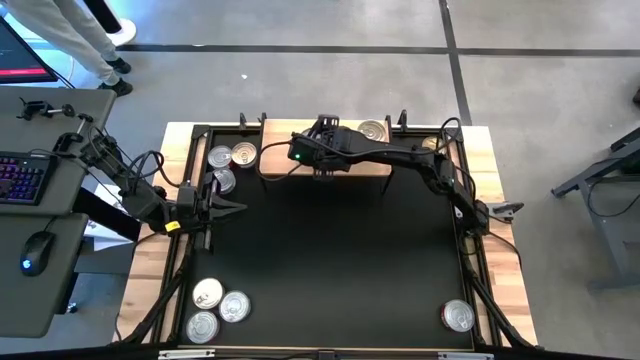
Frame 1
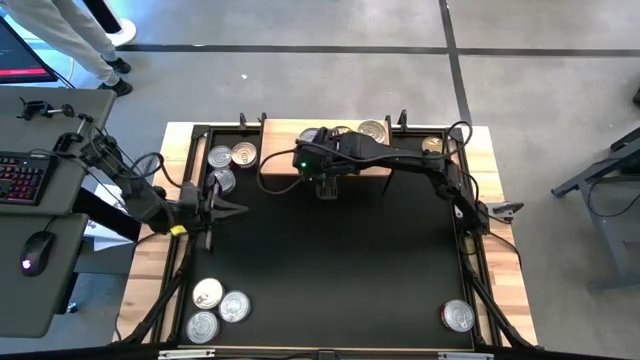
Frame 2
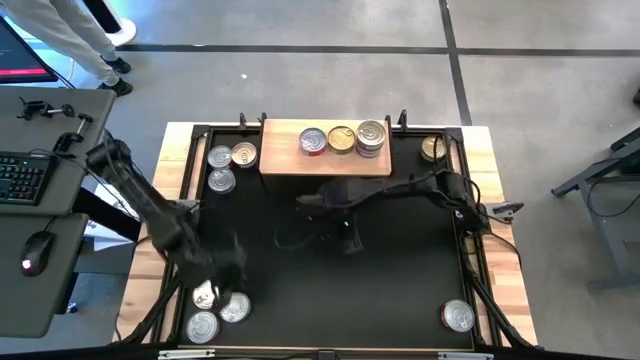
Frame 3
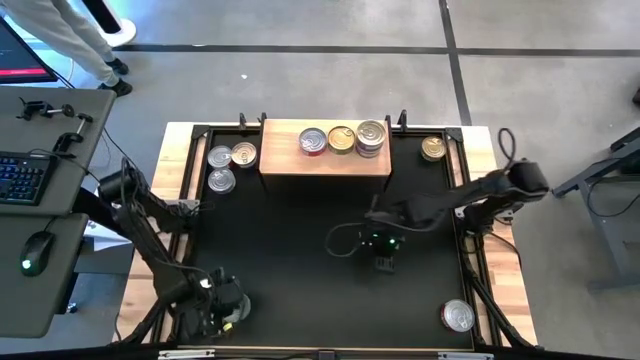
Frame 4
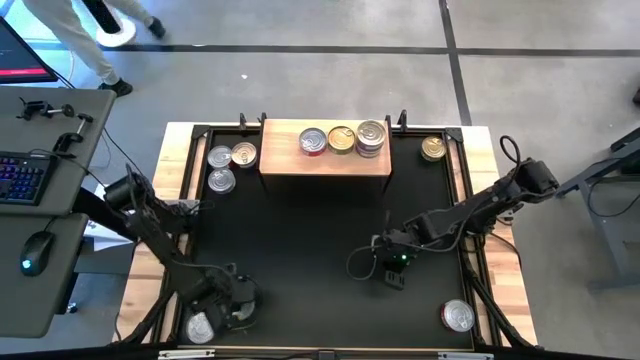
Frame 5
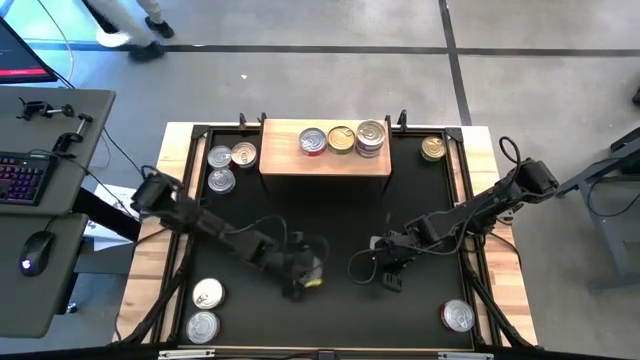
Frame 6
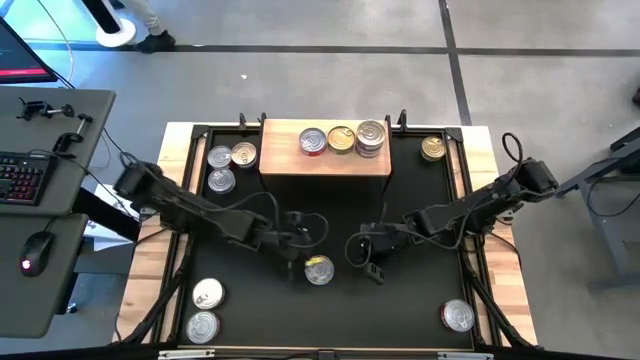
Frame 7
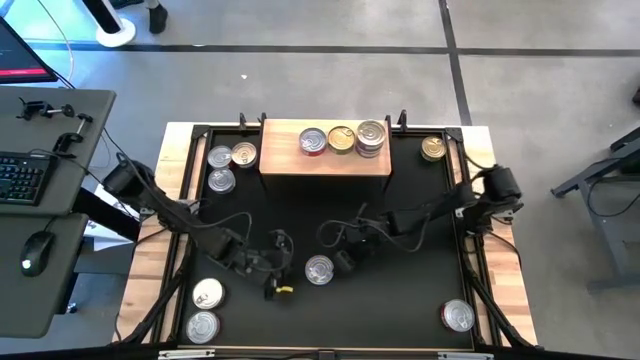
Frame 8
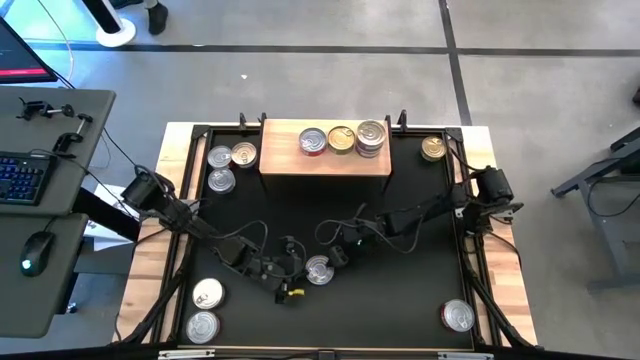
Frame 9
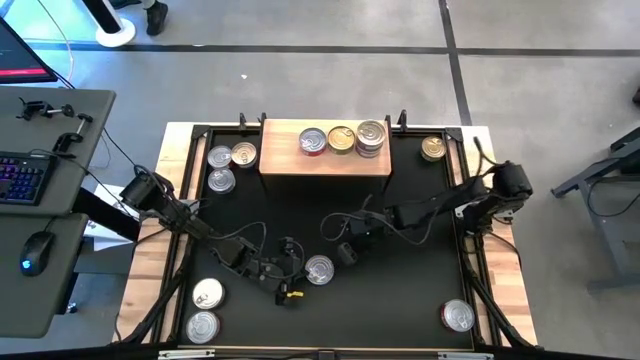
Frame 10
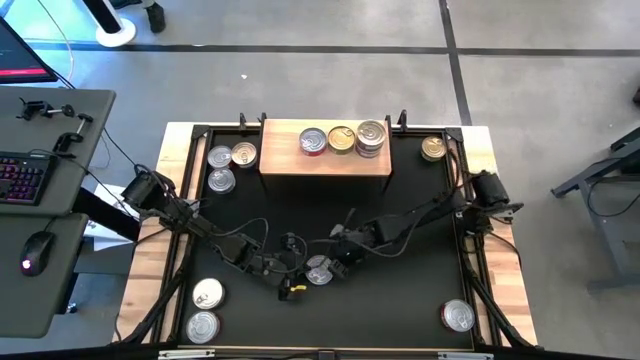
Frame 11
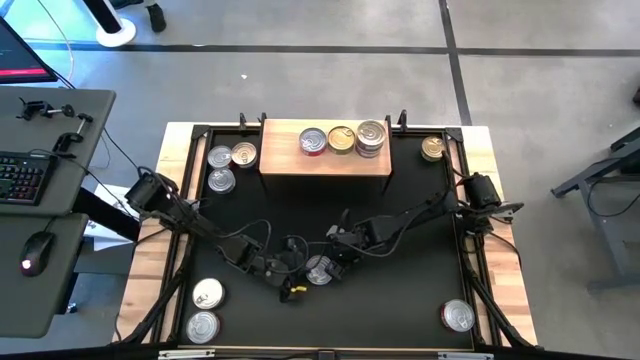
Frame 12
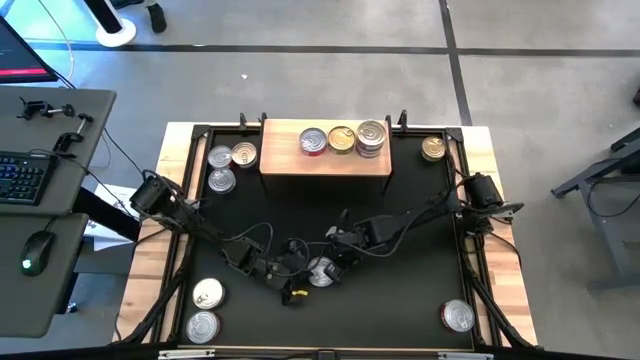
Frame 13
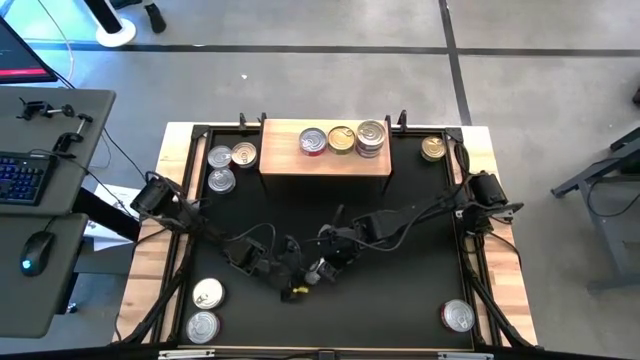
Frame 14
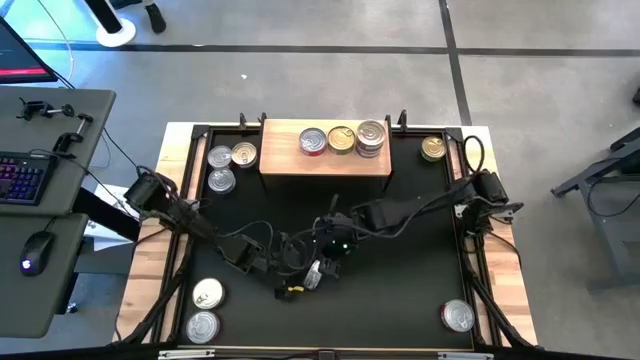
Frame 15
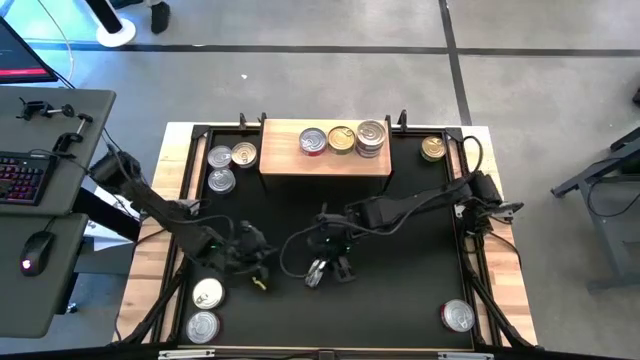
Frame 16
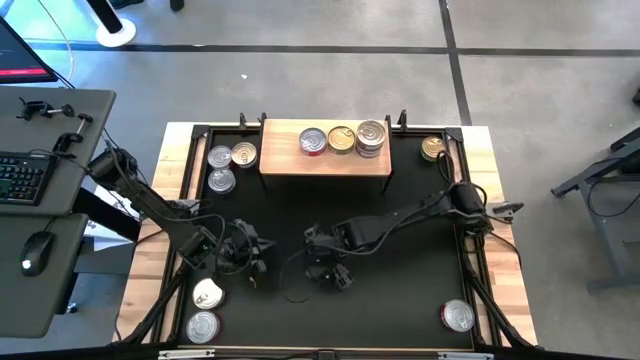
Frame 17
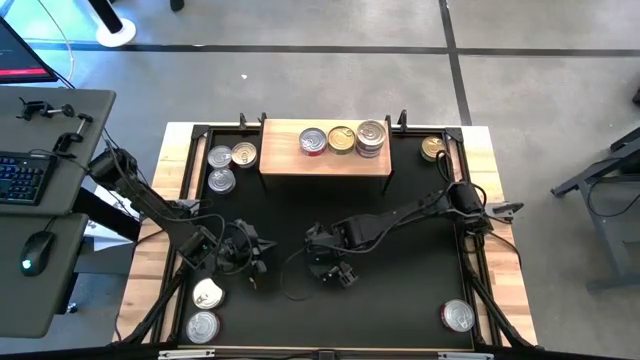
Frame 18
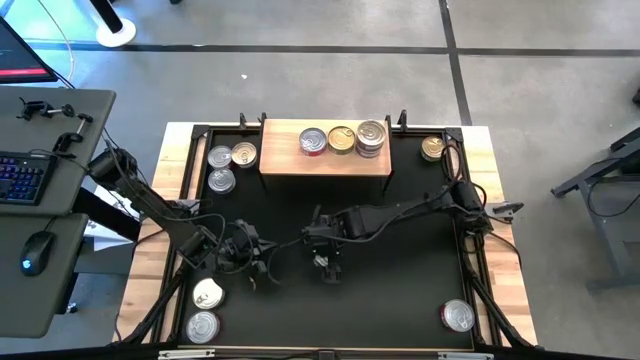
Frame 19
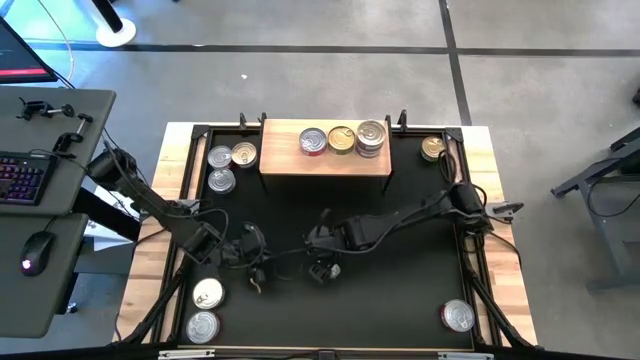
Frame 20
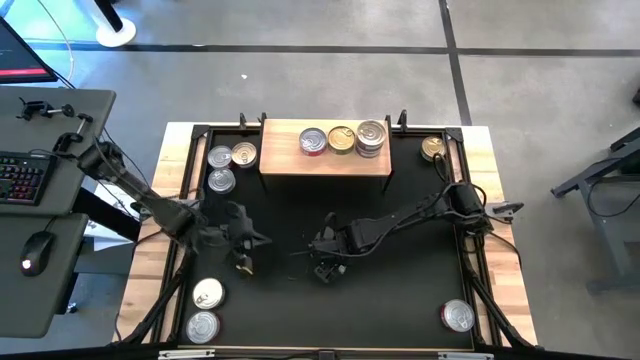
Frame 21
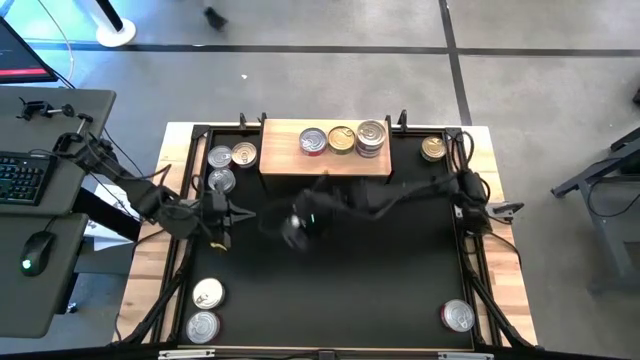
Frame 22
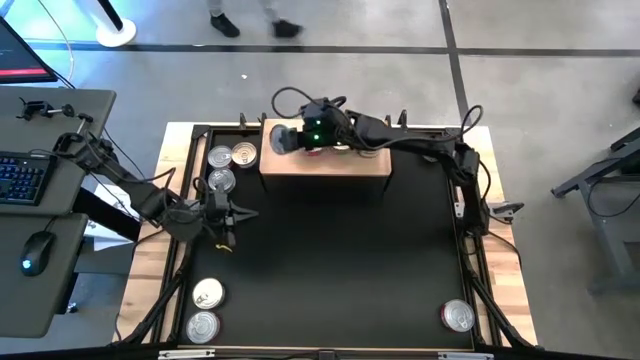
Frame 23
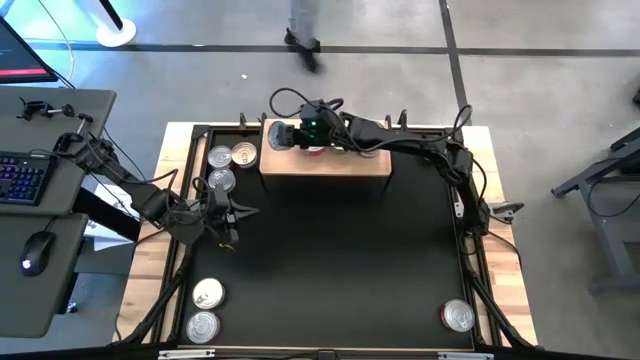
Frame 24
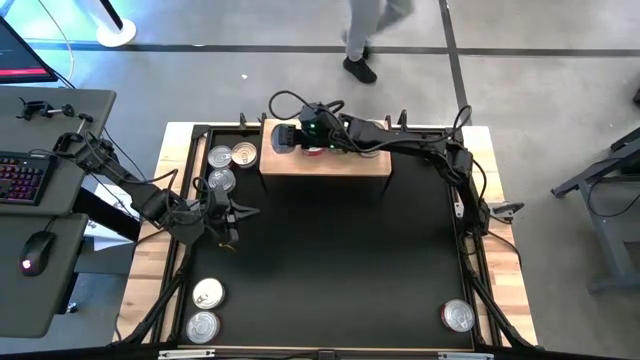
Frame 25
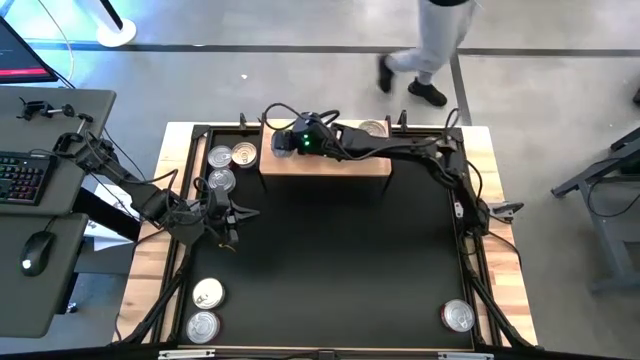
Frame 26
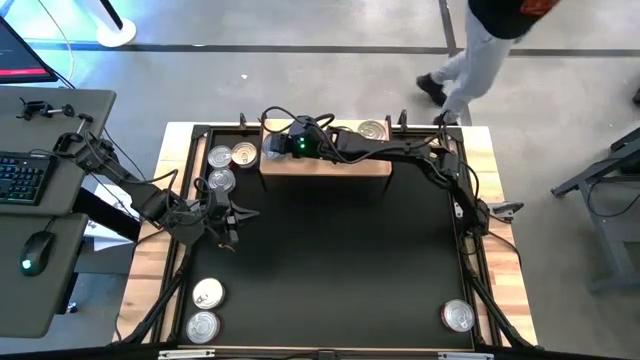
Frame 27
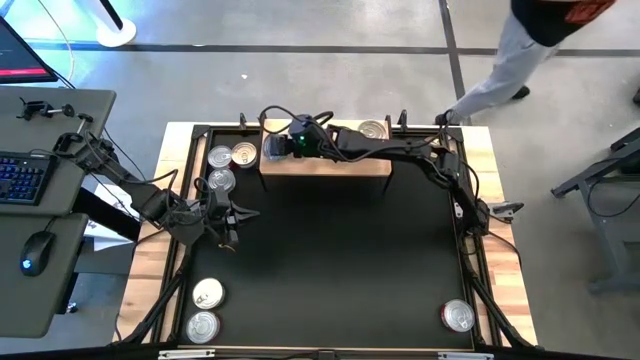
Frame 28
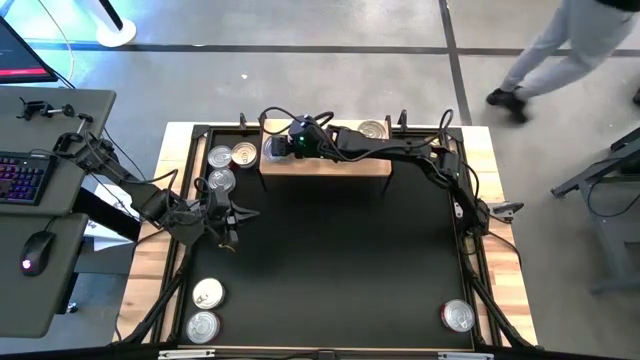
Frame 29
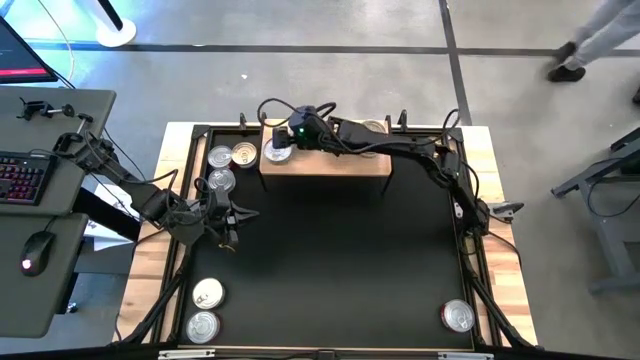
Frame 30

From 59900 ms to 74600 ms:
Task: Stack canned seafood by type on shelf
Put the bottom light green tuna can on the shelf

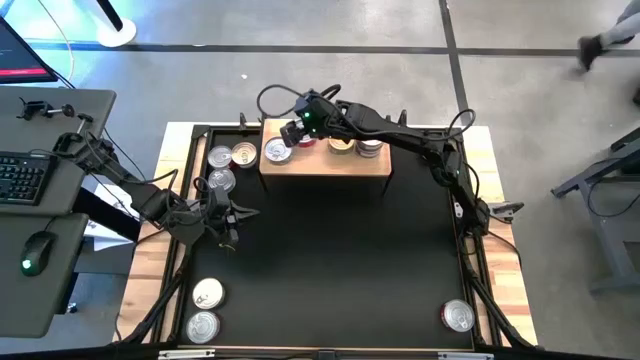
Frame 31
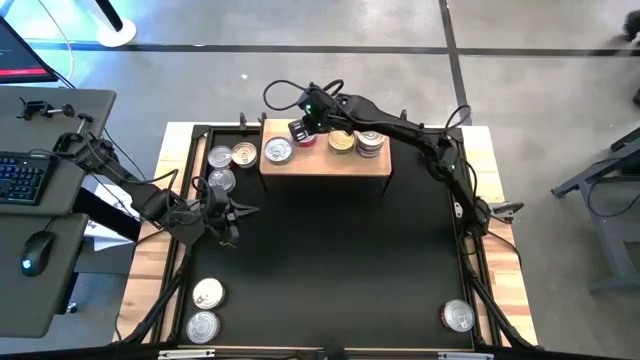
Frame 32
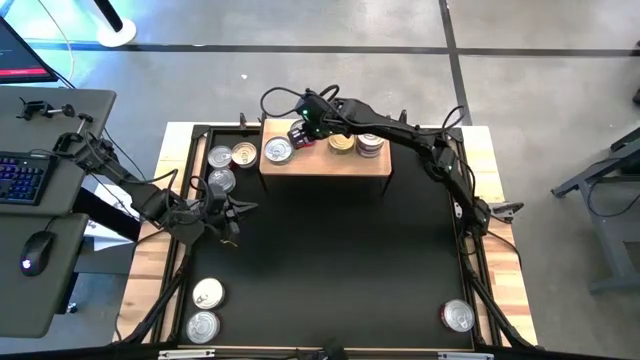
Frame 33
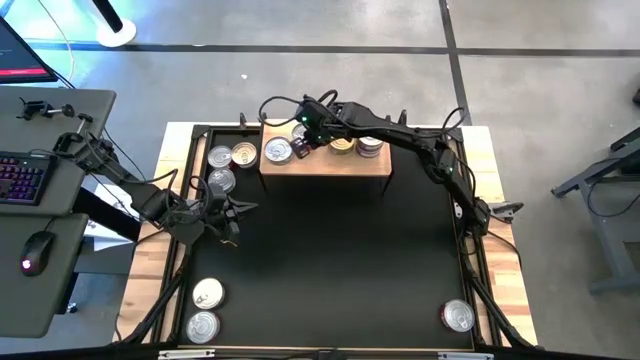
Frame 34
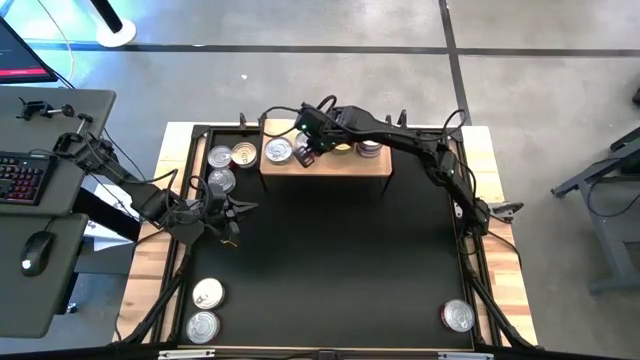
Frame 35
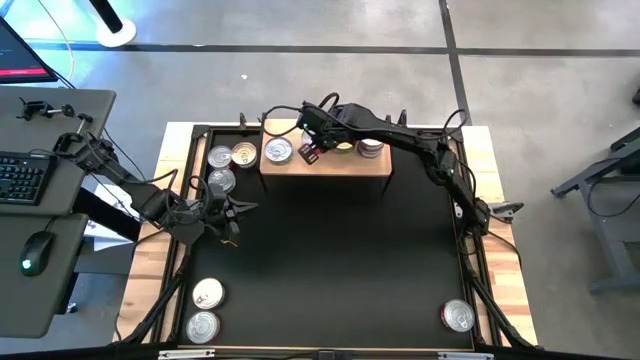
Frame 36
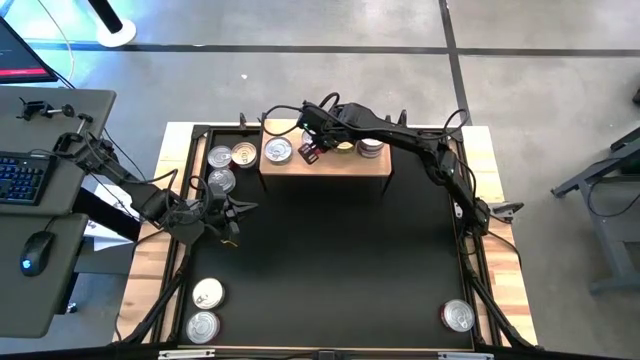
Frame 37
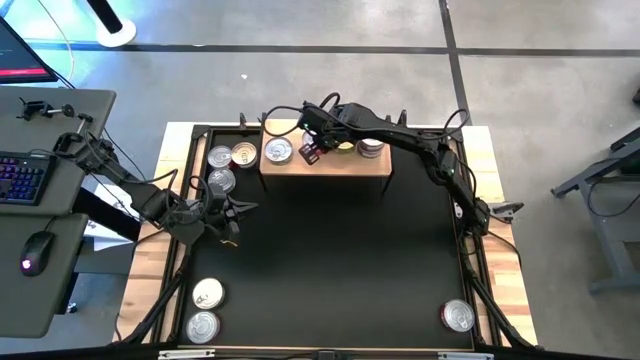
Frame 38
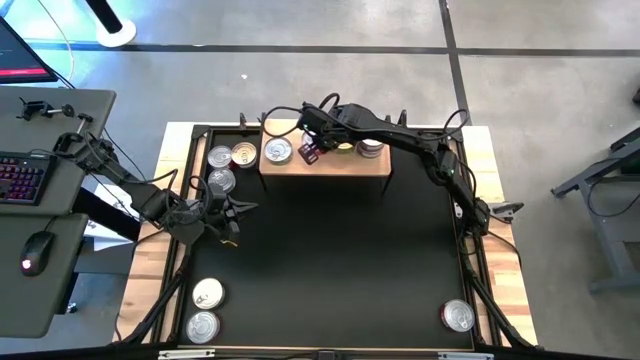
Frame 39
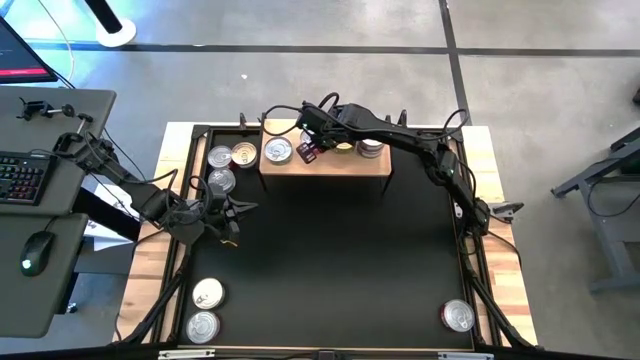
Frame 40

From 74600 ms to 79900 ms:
Adjust the red tuna can

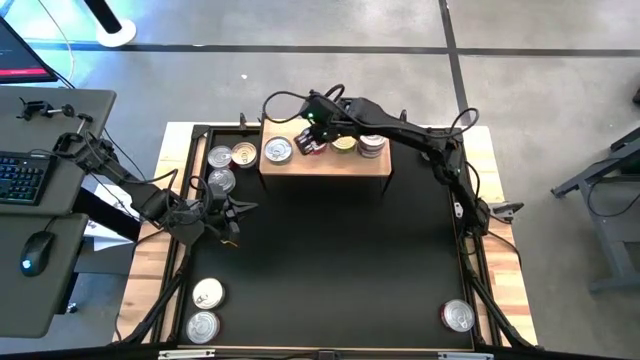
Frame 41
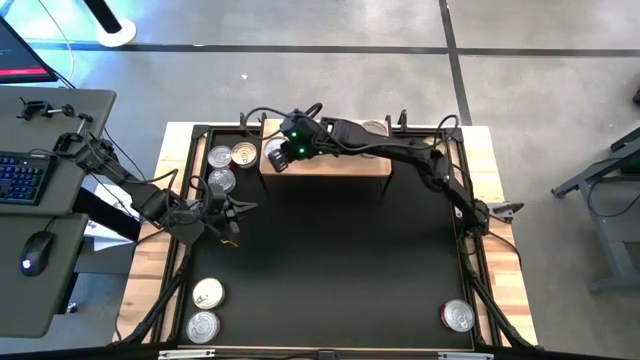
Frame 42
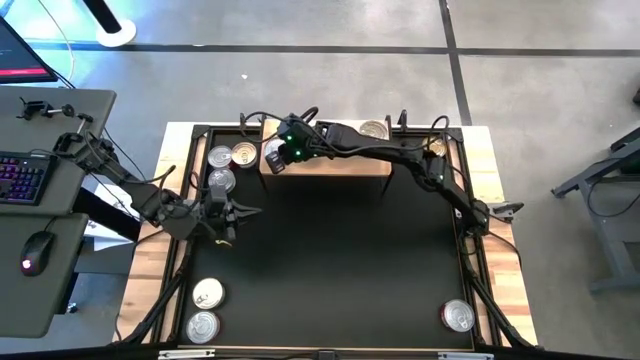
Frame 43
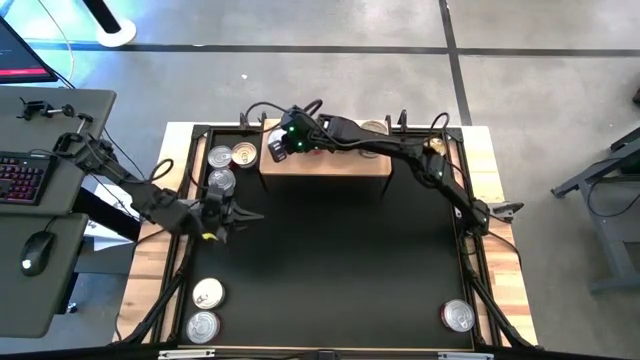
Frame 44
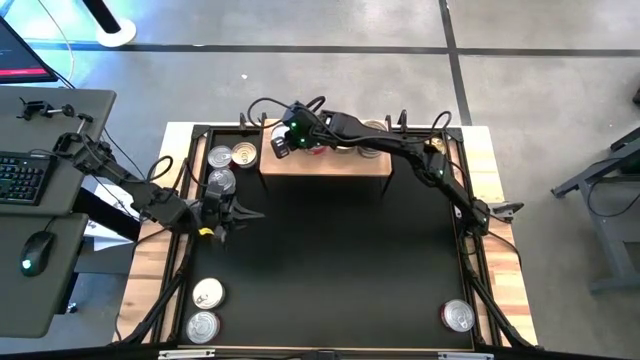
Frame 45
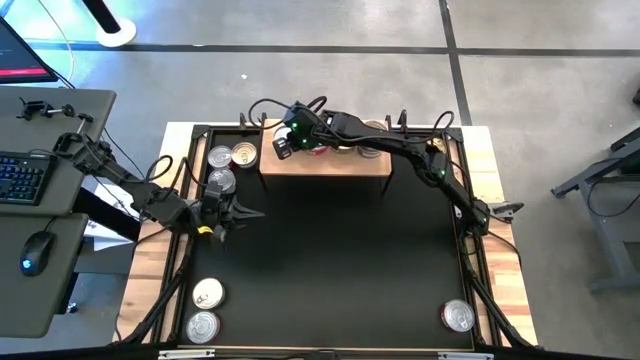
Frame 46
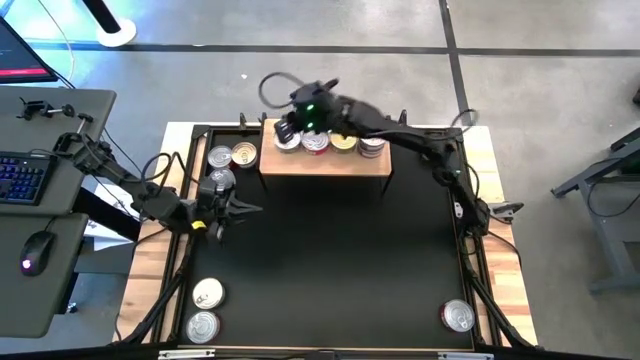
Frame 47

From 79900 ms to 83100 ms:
Adjust the light green tuna can
